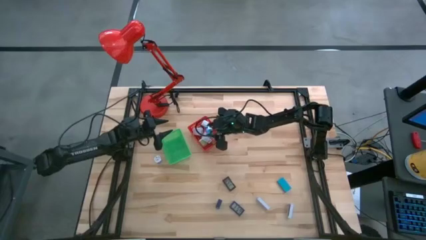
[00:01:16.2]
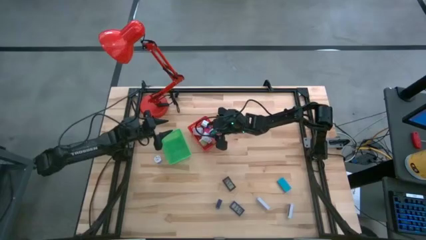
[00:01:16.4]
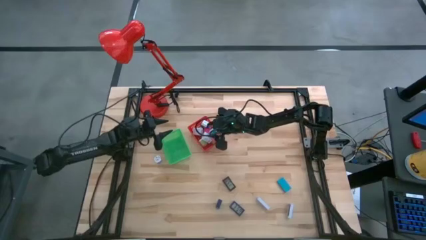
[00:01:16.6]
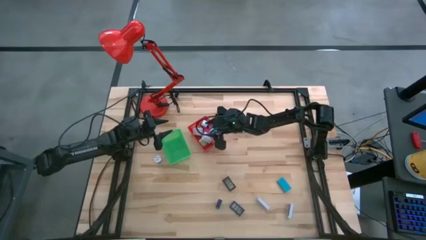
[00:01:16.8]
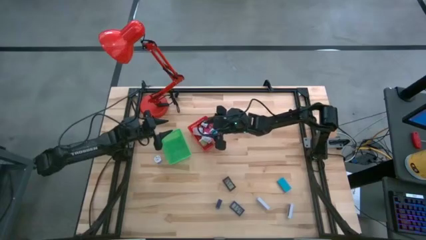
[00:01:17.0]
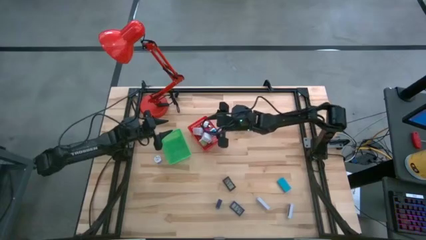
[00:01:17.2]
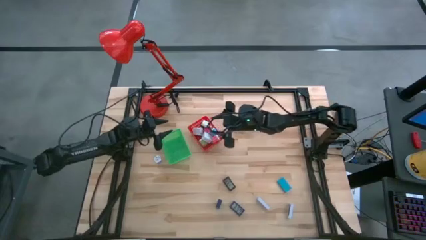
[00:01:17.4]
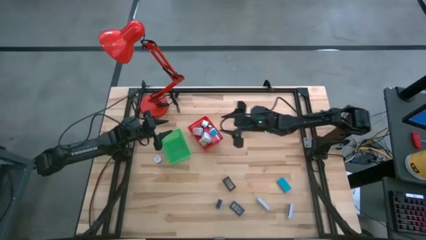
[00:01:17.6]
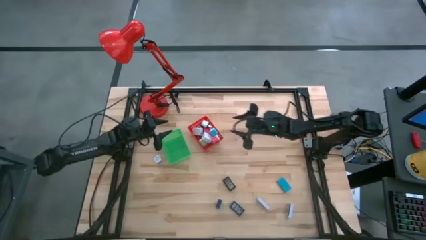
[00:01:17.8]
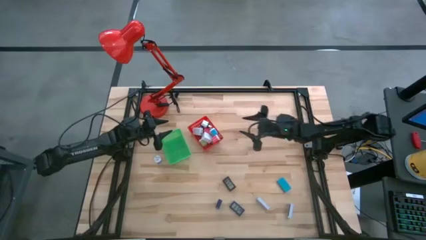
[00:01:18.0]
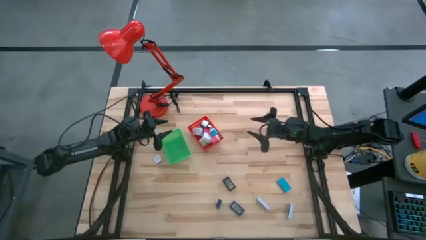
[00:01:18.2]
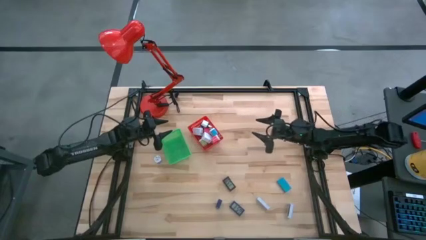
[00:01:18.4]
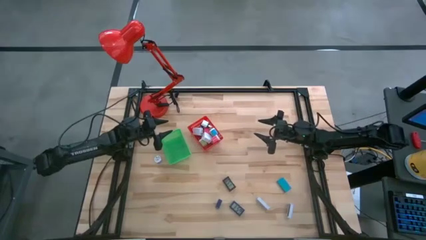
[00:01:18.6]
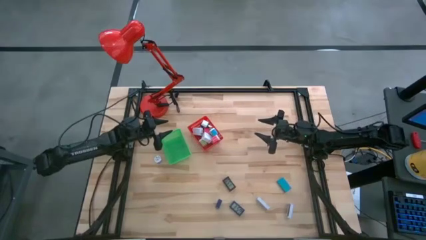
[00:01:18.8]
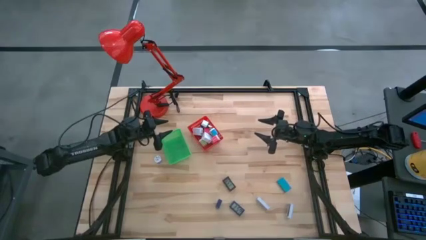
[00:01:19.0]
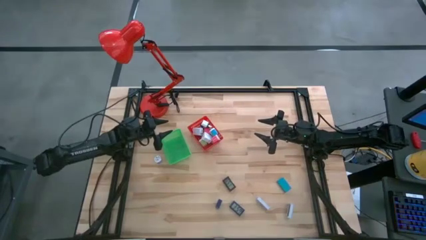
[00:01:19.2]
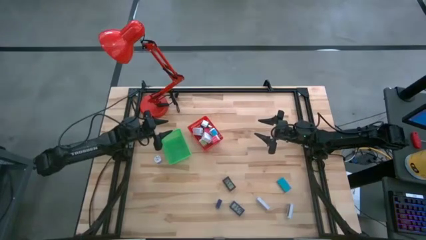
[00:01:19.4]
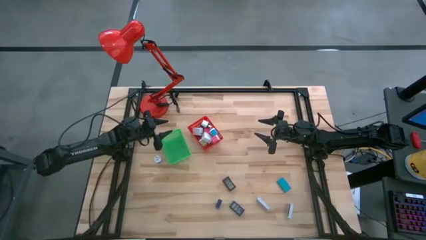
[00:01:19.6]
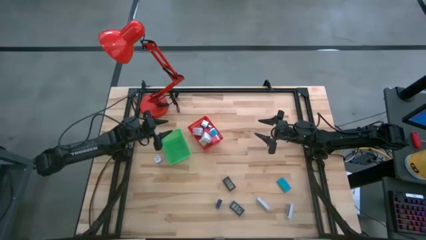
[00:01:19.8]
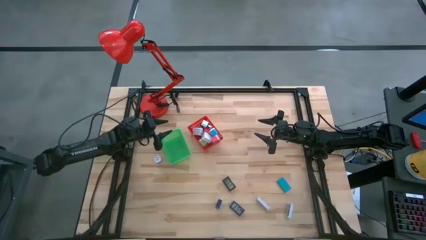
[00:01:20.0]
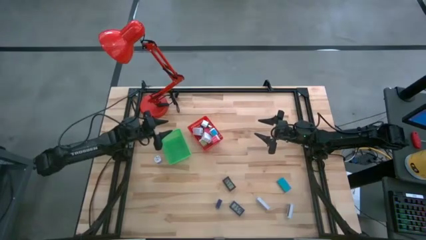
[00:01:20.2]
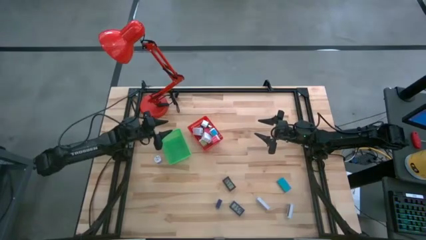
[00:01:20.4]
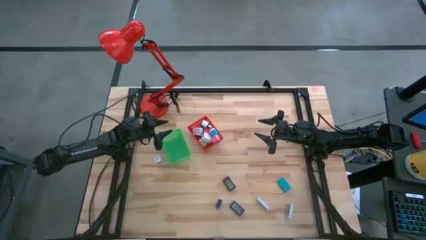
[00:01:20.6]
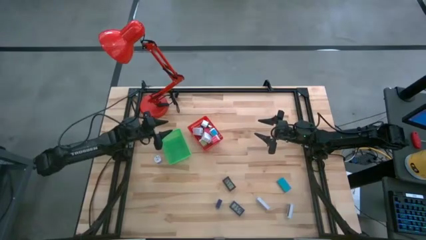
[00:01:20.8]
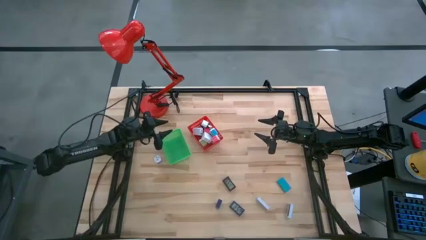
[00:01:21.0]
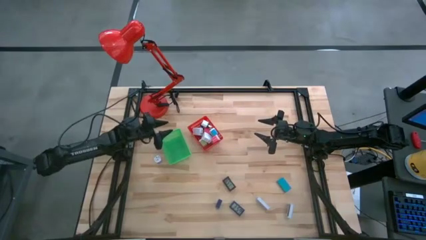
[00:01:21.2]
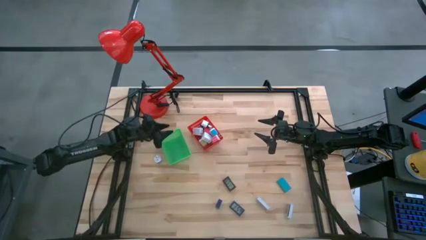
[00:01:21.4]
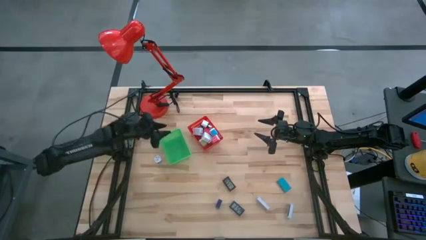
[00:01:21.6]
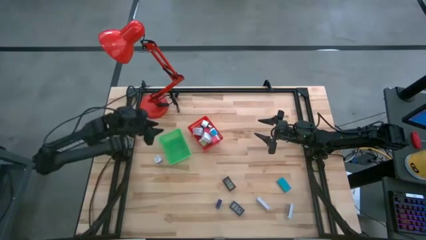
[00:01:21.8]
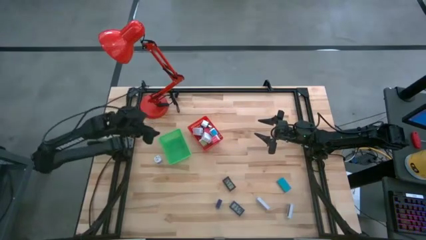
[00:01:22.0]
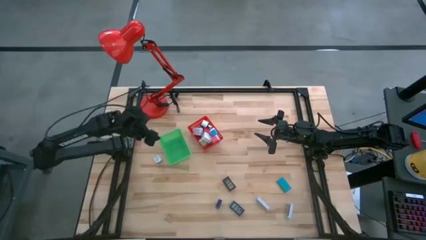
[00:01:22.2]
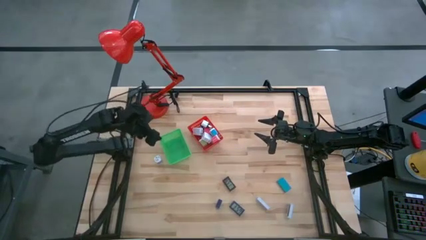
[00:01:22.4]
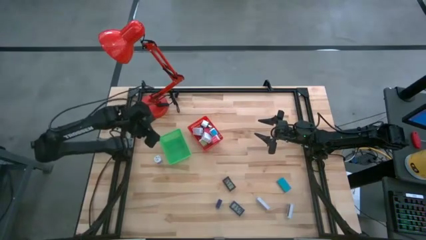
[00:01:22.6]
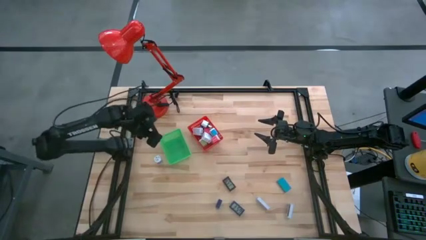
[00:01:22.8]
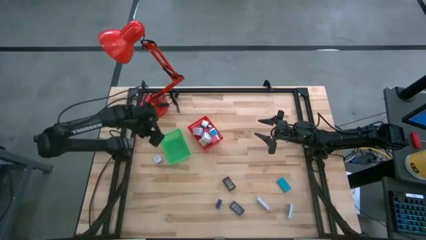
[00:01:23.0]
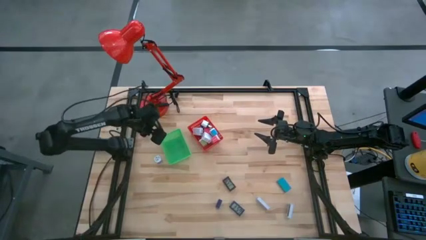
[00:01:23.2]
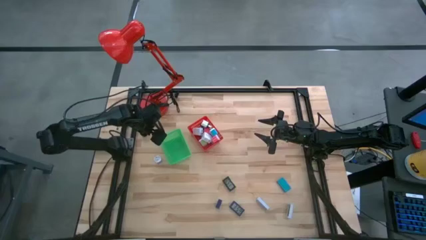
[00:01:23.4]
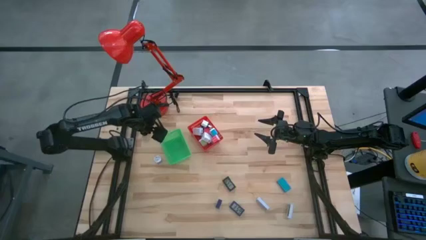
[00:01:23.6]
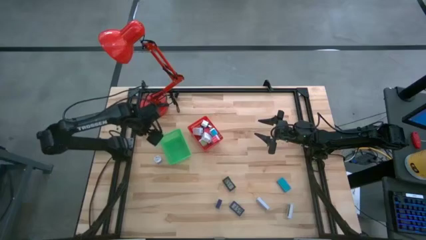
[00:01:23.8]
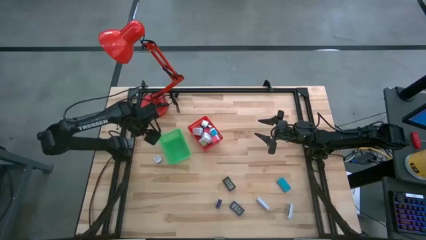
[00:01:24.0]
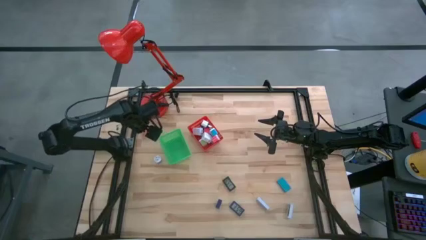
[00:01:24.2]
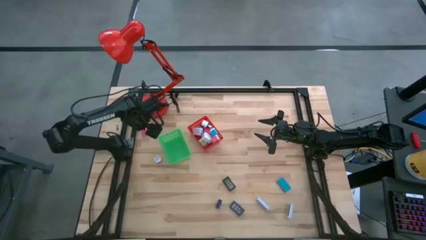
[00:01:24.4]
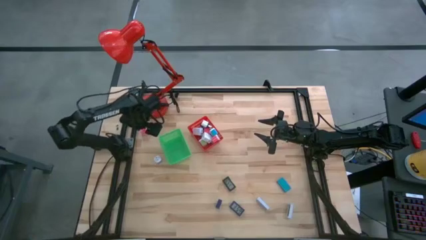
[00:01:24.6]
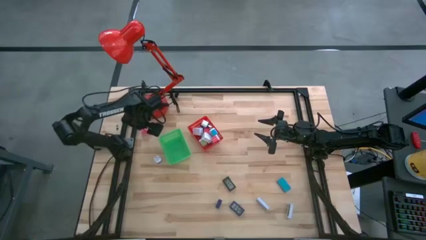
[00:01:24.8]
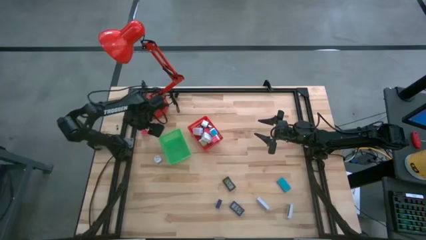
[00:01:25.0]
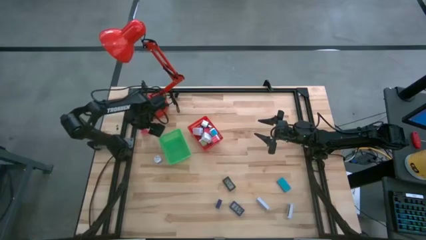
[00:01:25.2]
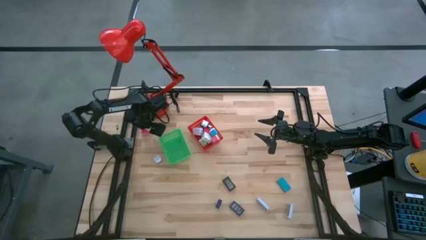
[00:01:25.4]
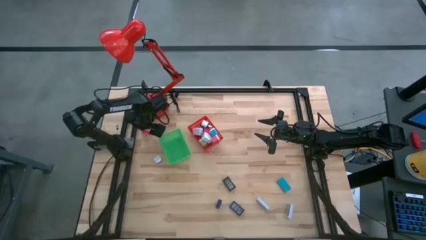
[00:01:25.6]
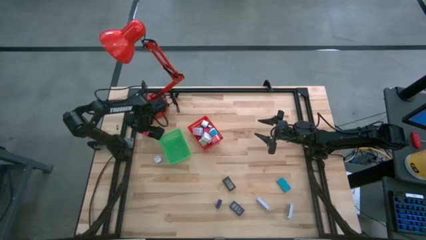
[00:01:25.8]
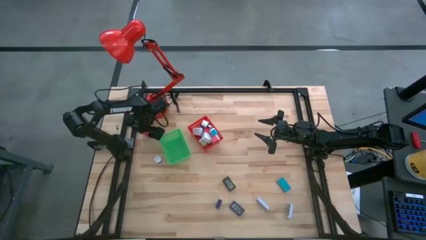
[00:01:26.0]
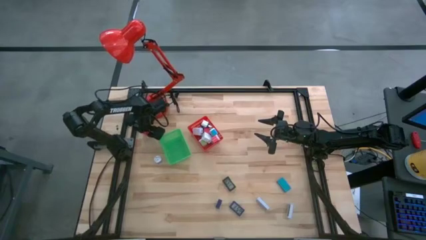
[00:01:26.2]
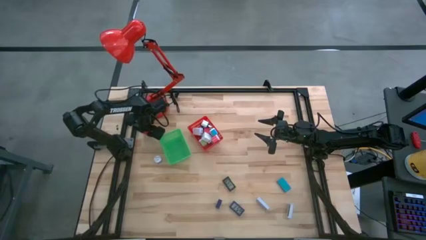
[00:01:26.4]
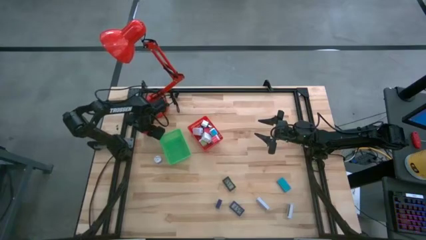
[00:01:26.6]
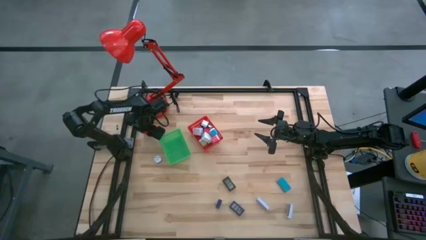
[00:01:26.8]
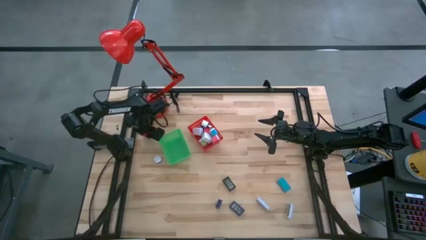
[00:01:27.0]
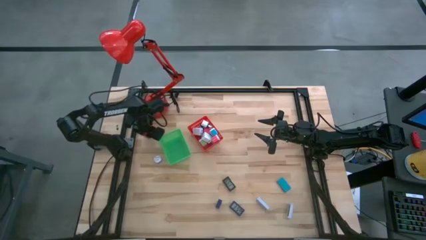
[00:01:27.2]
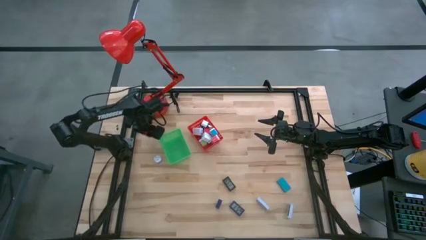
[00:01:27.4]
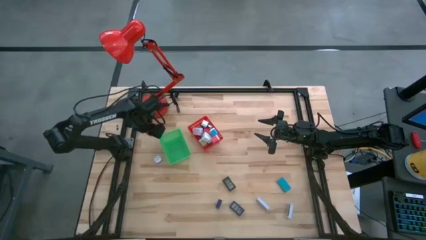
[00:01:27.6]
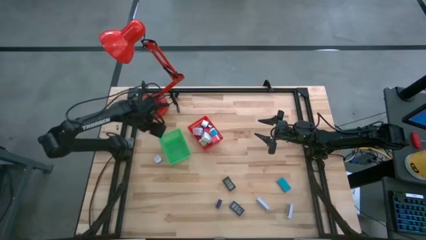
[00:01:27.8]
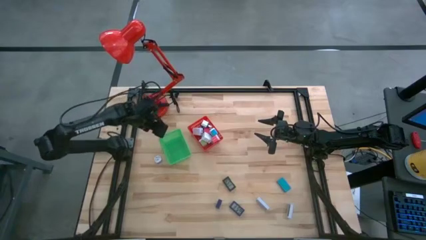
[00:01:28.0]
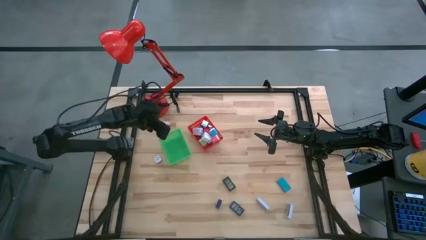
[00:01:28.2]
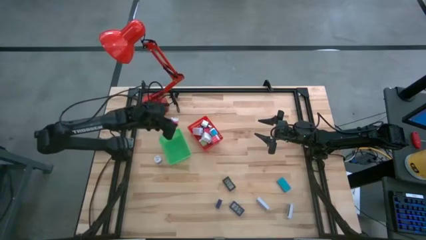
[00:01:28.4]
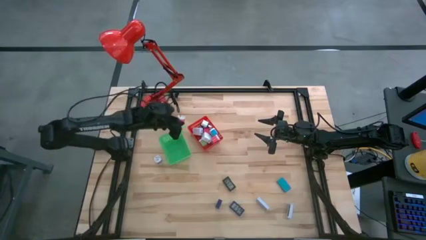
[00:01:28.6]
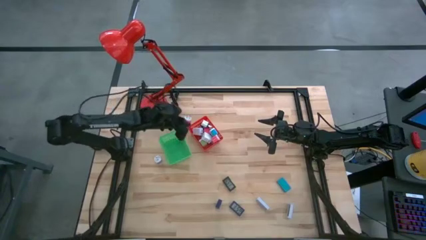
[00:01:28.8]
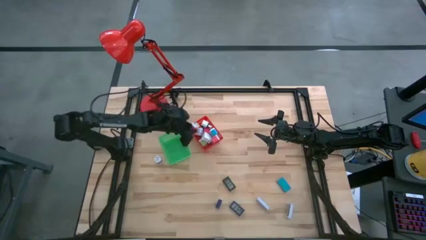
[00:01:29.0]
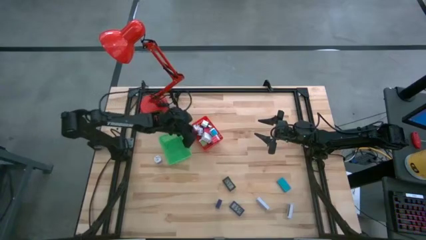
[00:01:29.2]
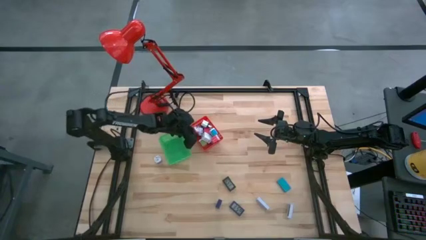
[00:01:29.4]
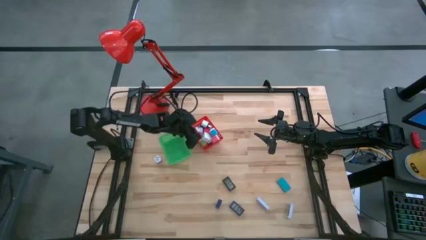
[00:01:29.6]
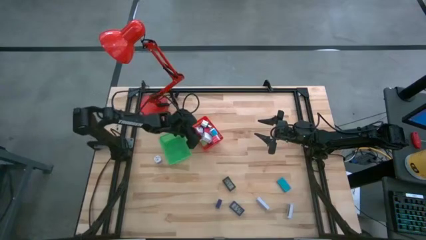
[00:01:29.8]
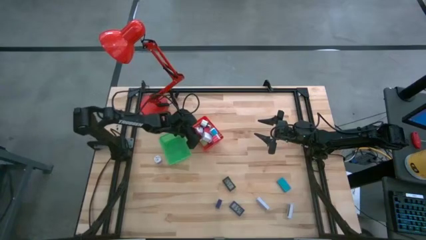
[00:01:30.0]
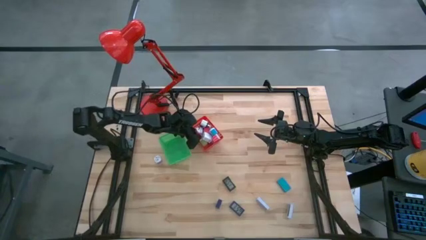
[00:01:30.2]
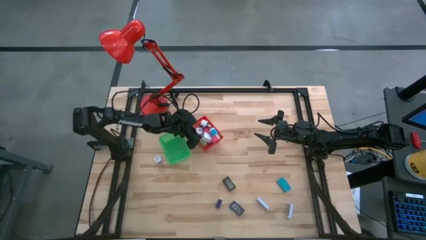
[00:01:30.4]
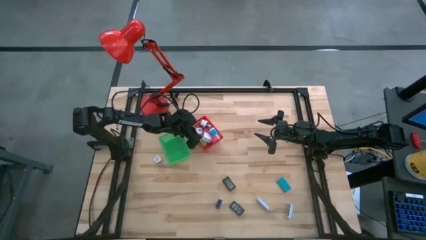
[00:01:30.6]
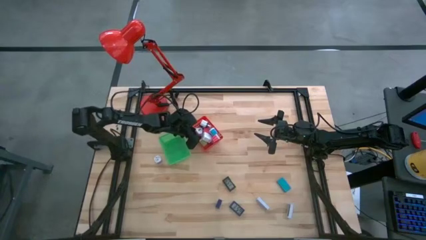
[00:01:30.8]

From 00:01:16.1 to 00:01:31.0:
Task: Pick & Place Office items
Put the pink charger adapter into the red bin
